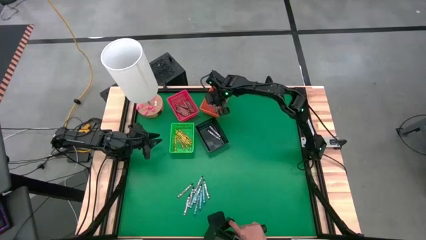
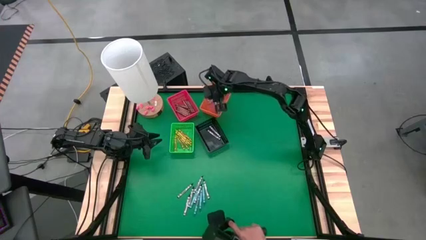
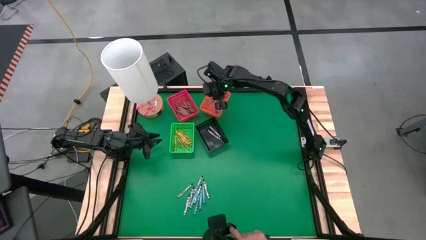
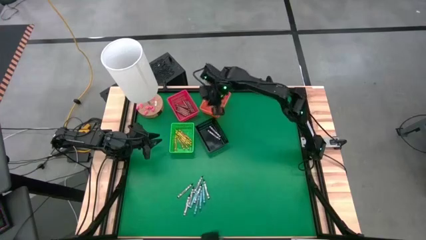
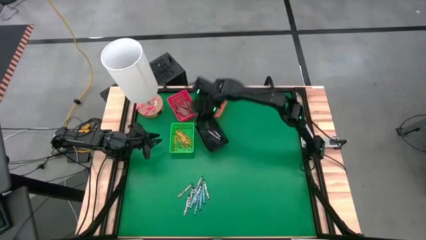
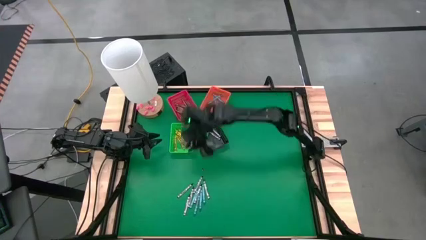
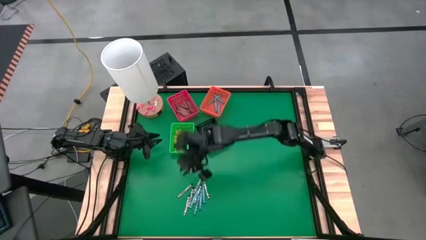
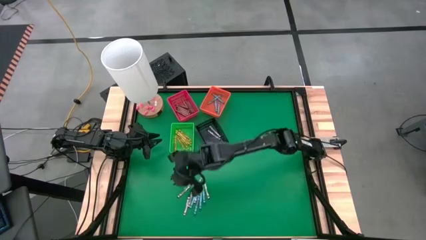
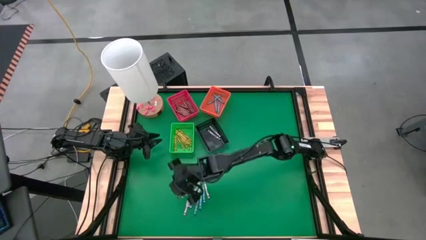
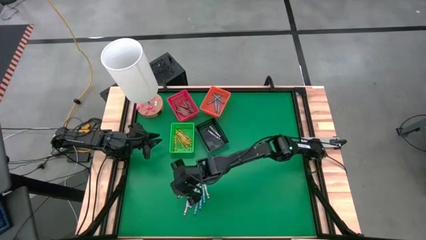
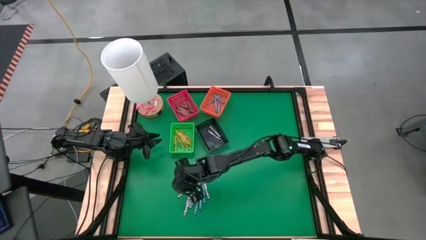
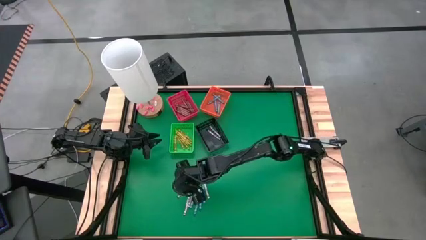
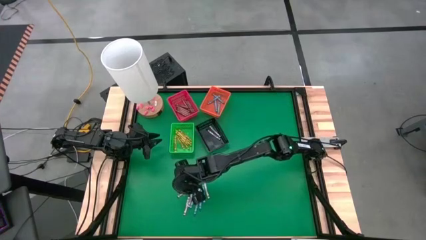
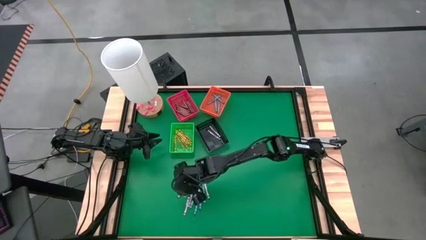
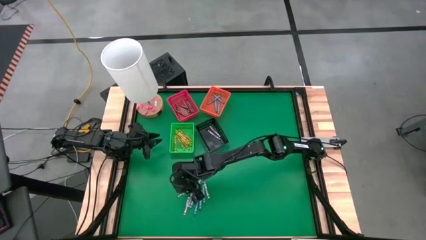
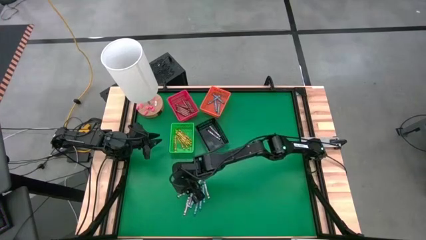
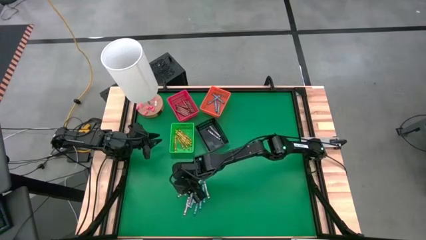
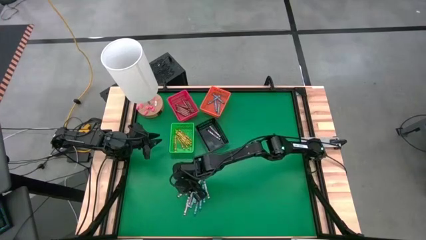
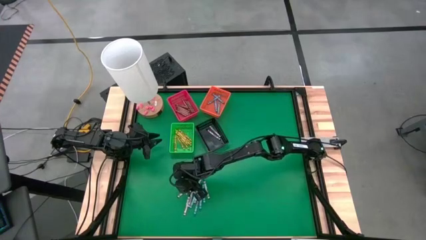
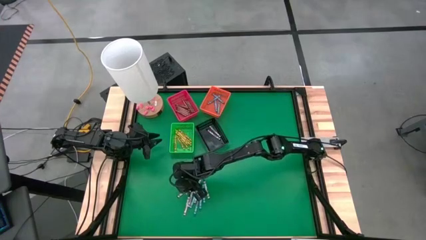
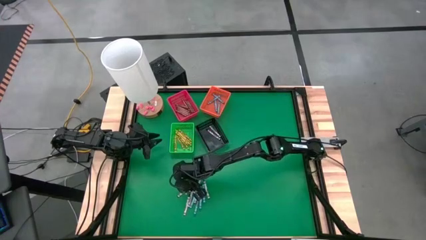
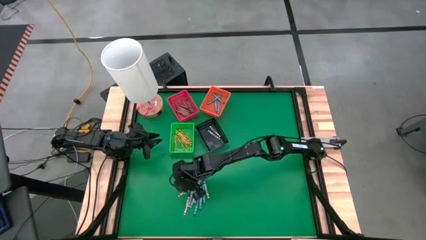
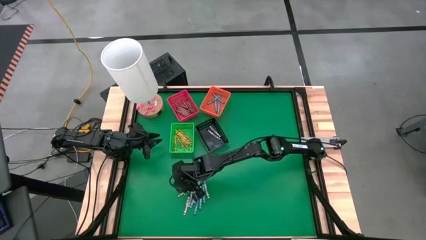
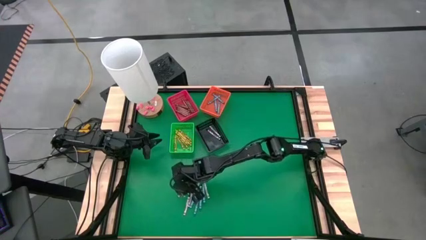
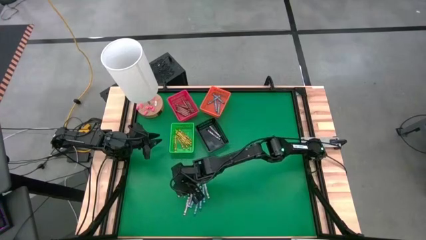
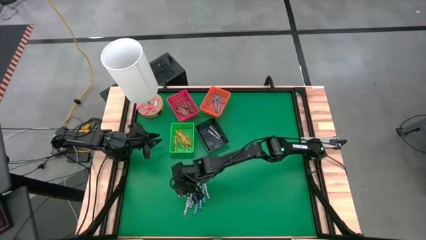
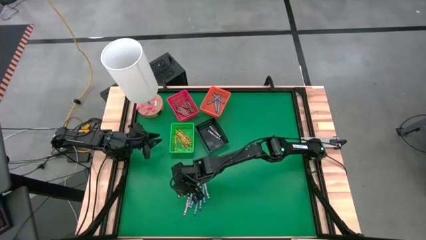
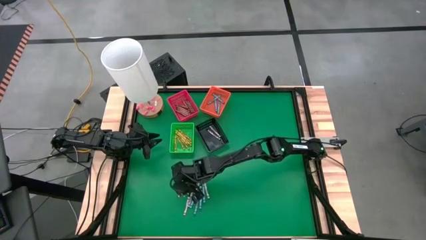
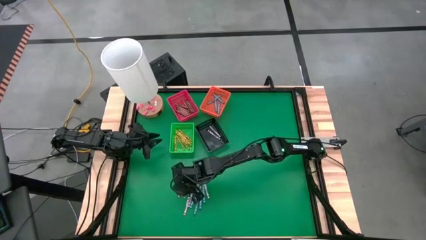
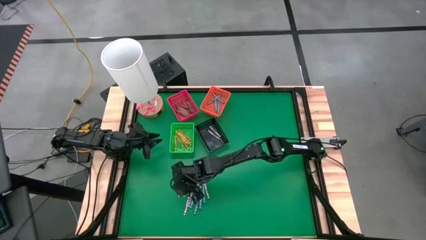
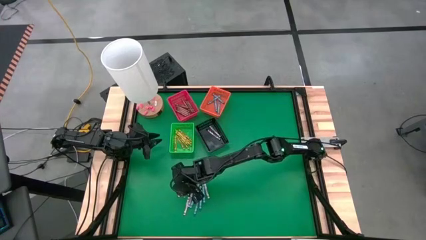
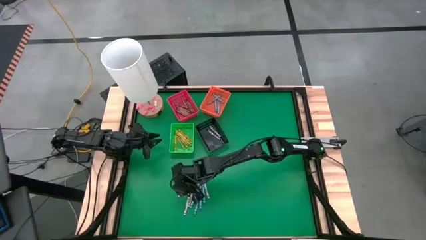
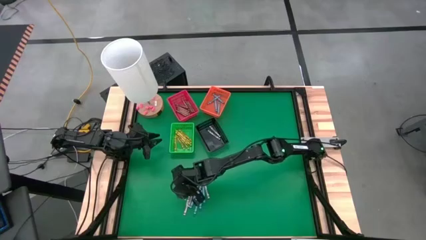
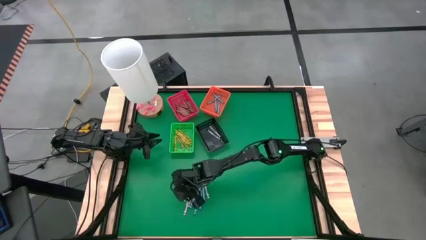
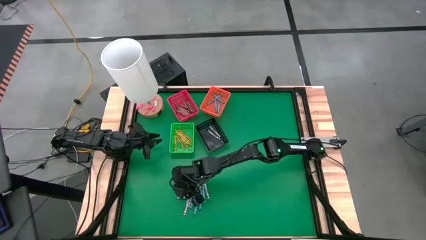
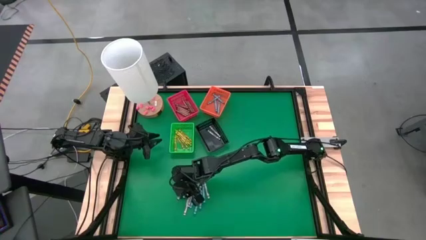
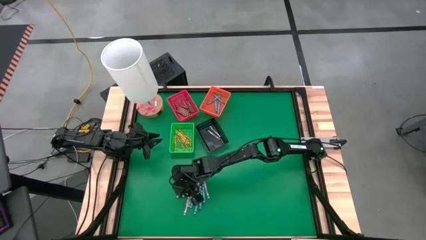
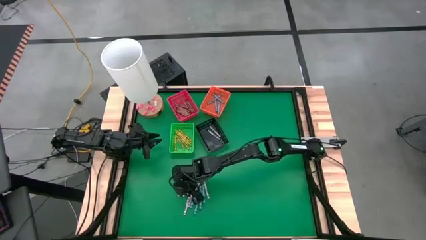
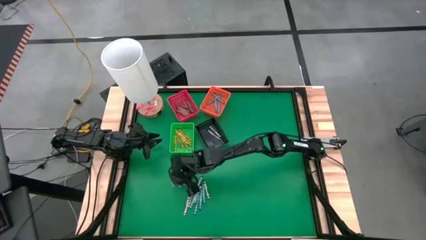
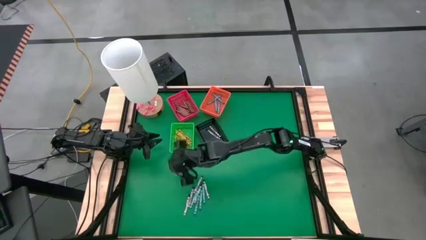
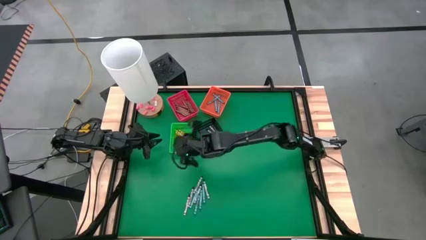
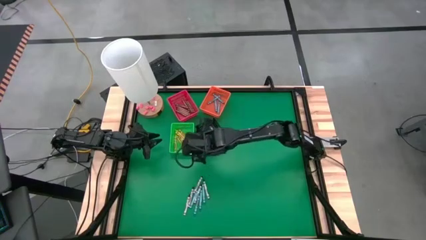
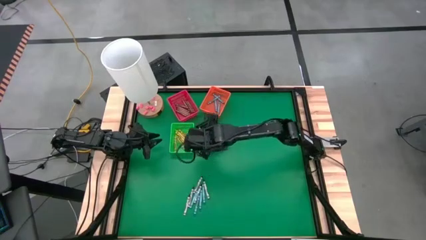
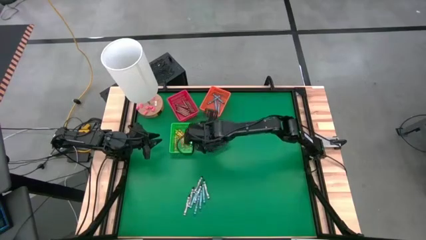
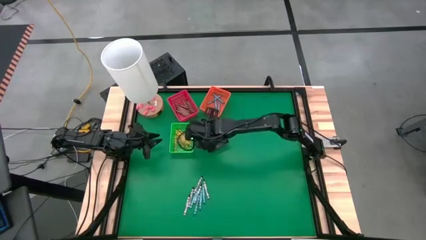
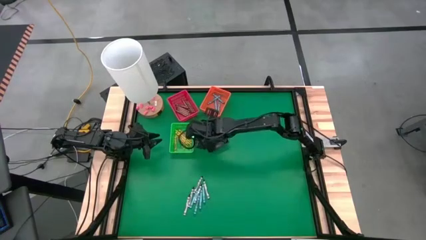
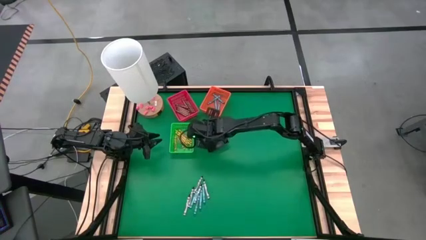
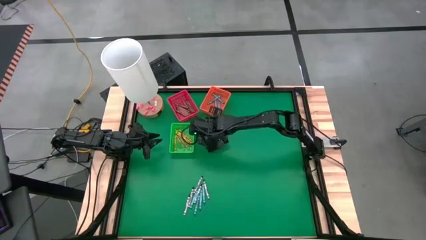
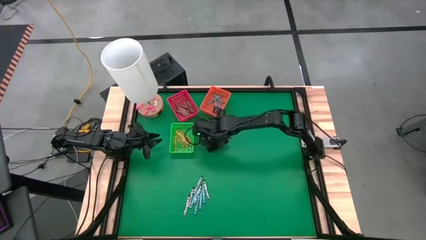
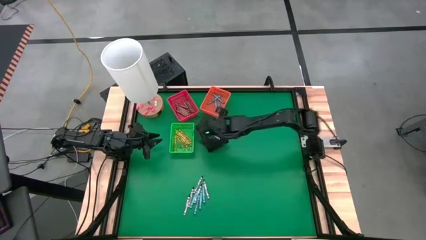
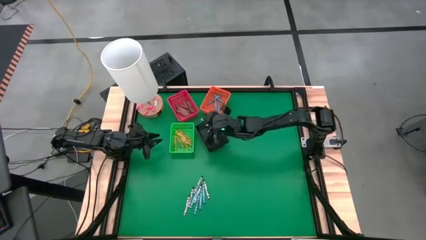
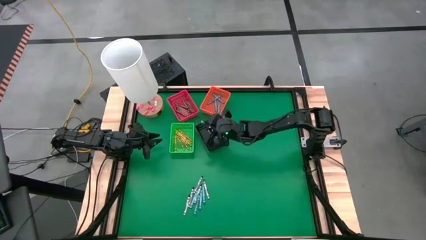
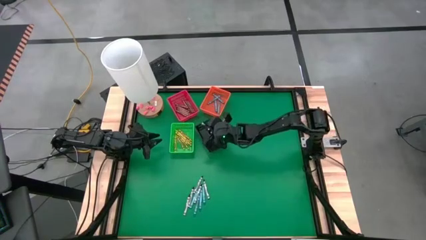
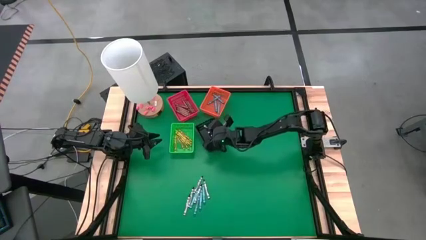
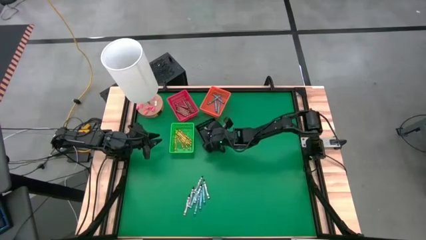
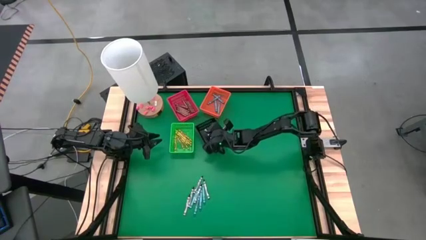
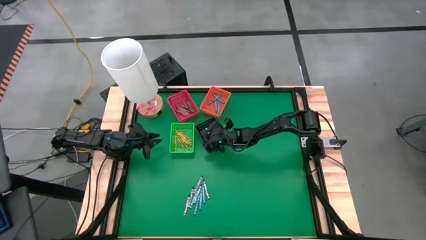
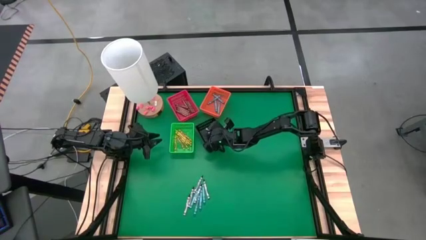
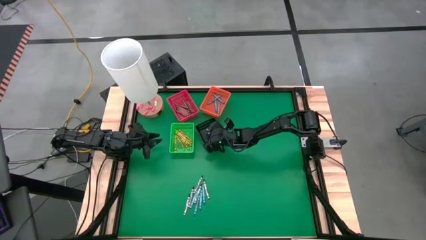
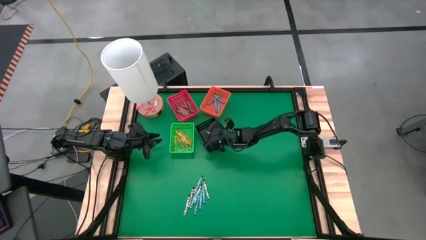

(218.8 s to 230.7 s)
Task: Sort crayons
Put the black crayon into the black bin

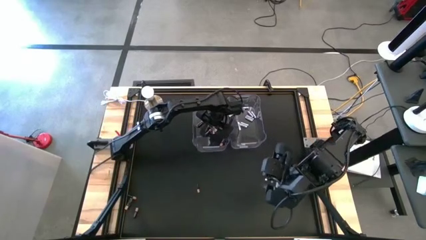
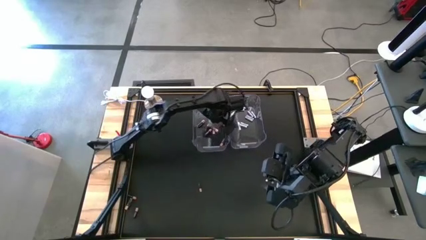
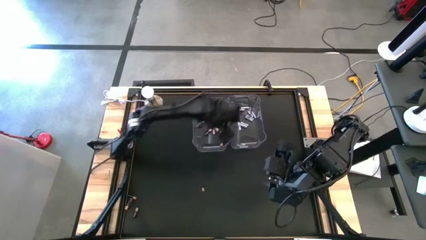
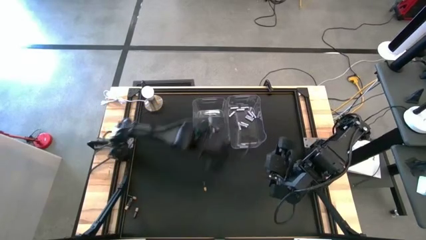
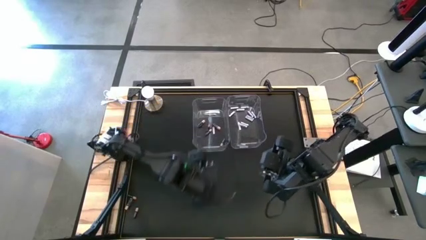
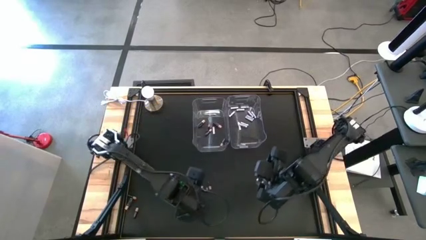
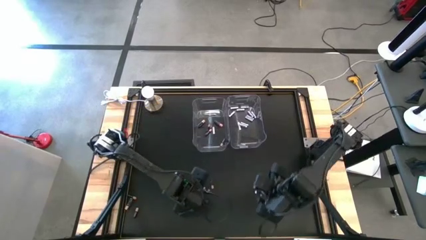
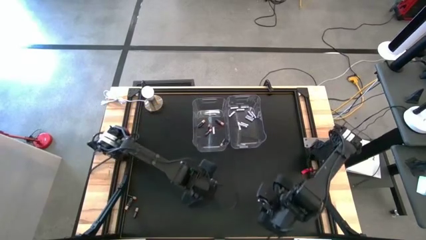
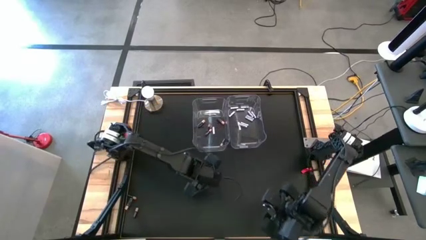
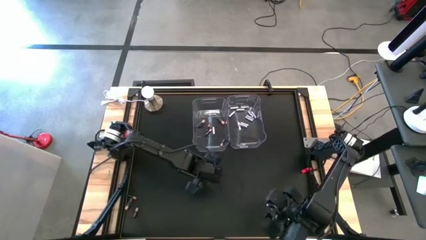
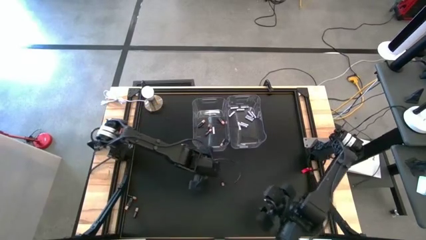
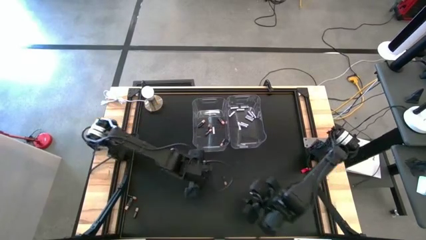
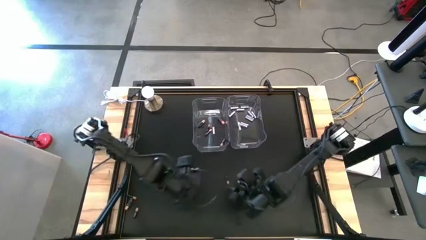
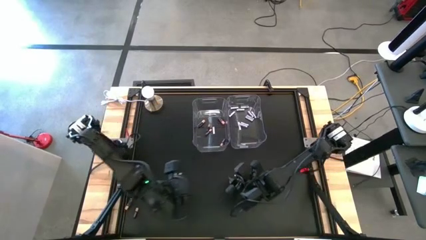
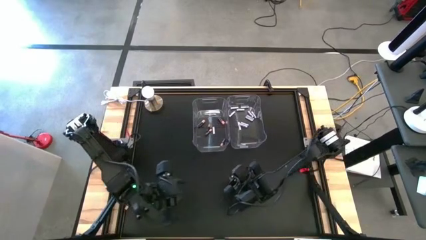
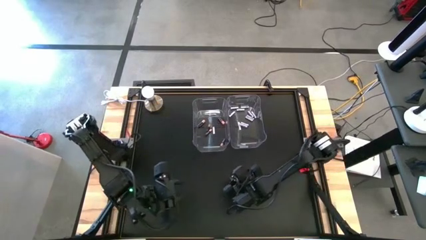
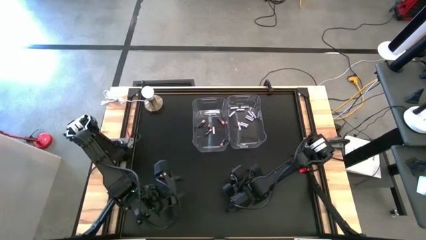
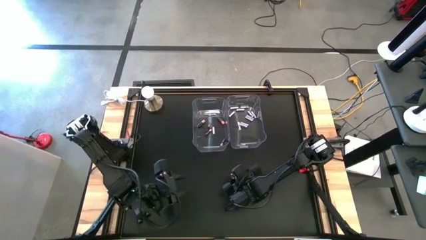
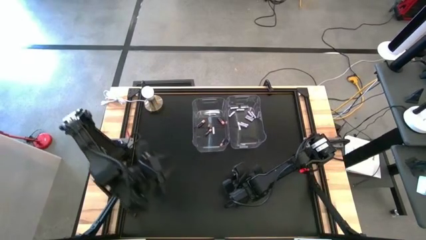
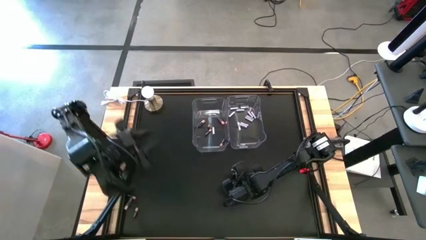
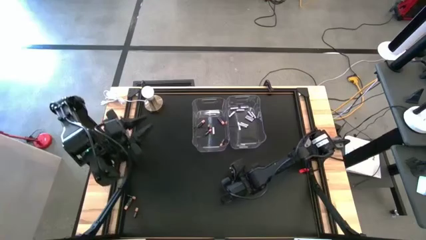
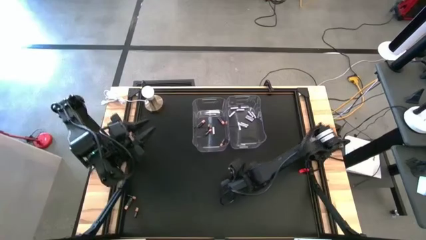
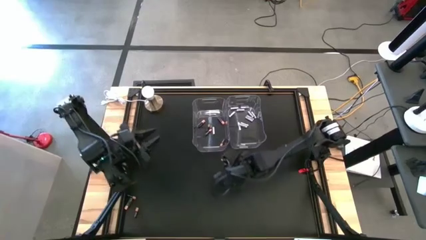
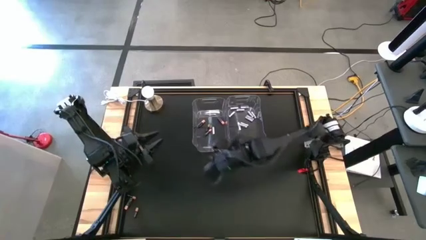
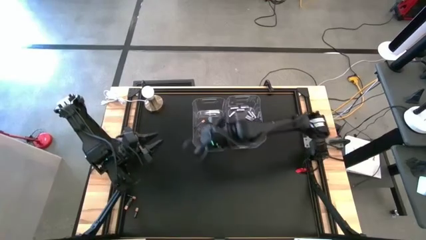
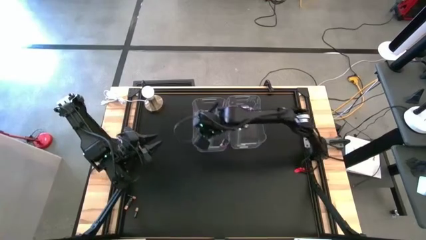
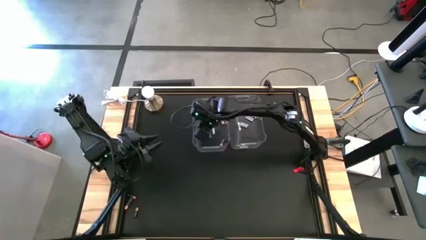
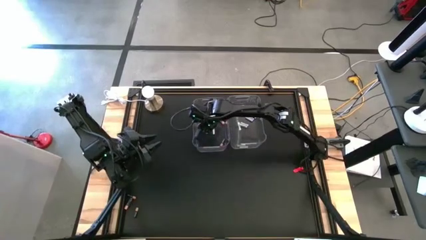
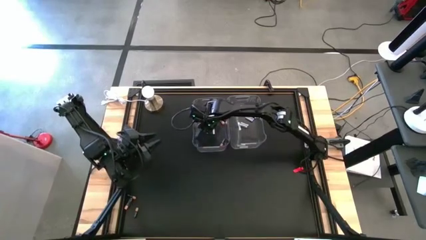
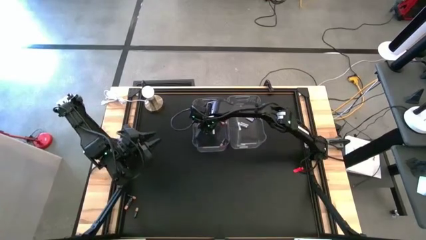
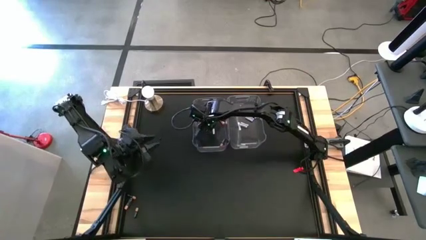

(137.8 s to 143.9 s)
Task: Sort batteries
Put the black battery into the left transparent bin
